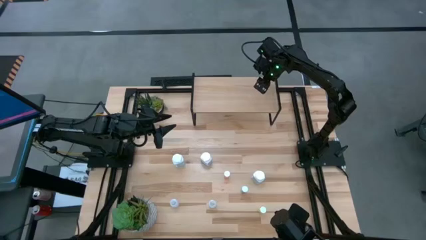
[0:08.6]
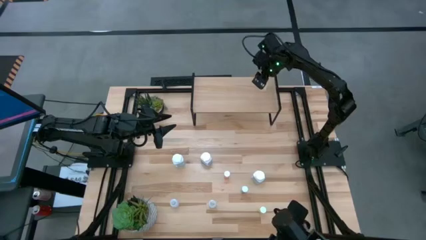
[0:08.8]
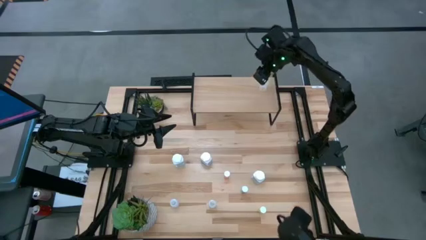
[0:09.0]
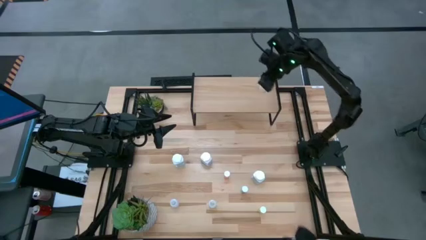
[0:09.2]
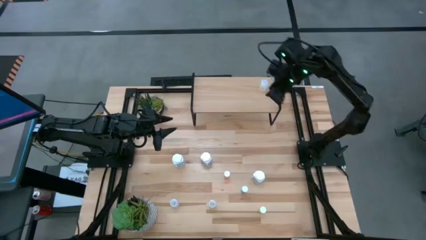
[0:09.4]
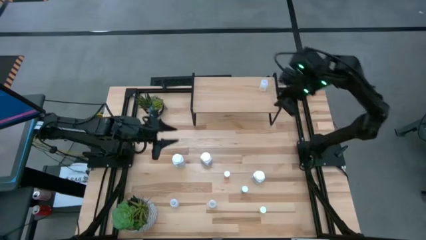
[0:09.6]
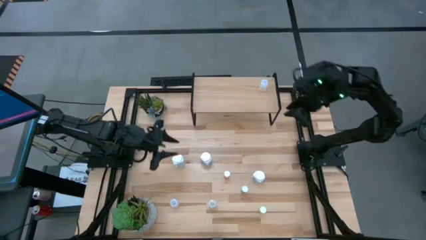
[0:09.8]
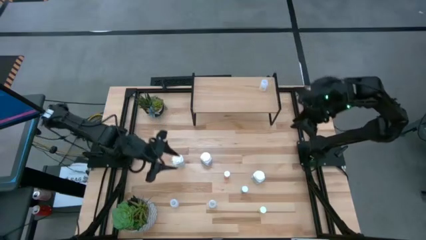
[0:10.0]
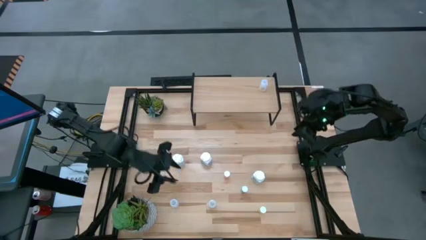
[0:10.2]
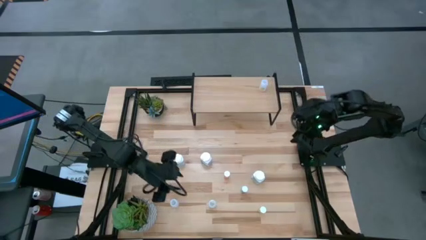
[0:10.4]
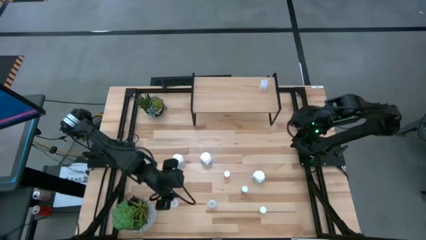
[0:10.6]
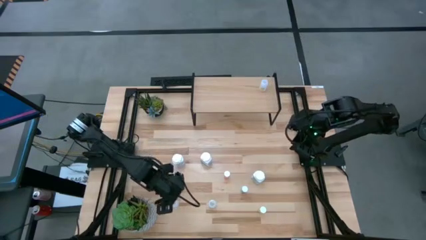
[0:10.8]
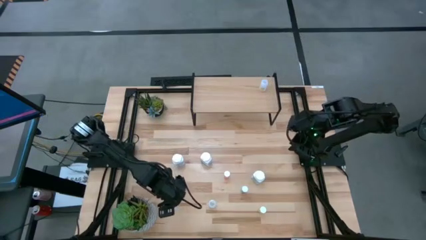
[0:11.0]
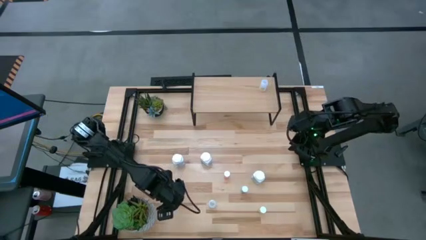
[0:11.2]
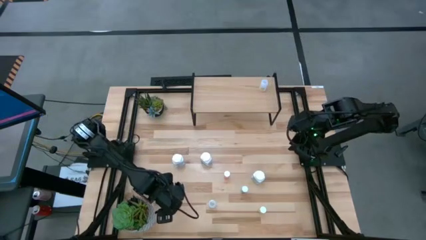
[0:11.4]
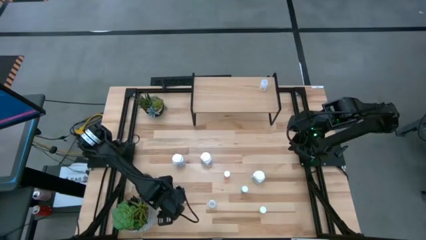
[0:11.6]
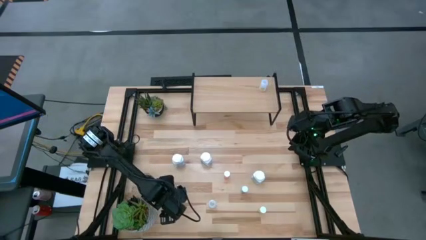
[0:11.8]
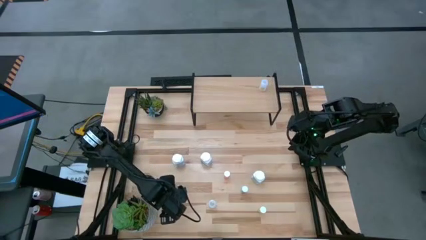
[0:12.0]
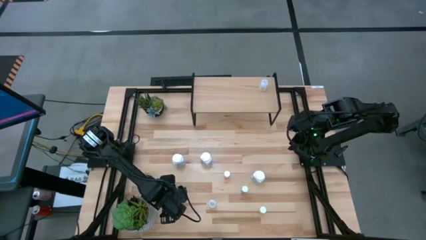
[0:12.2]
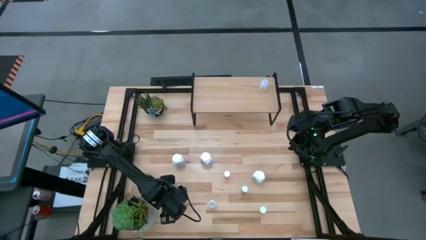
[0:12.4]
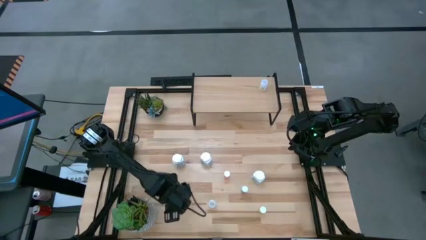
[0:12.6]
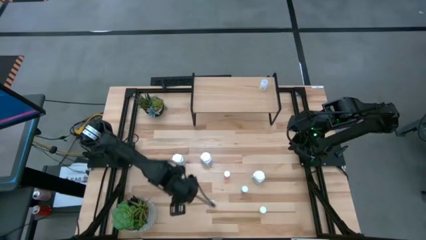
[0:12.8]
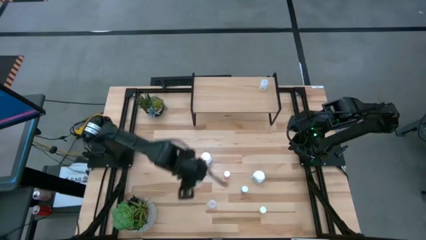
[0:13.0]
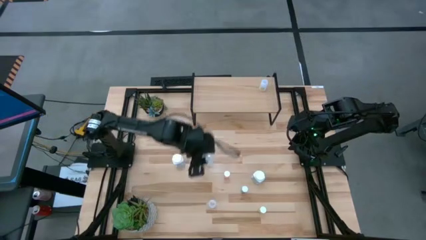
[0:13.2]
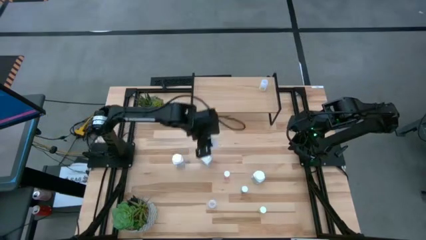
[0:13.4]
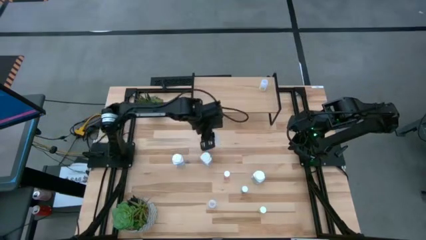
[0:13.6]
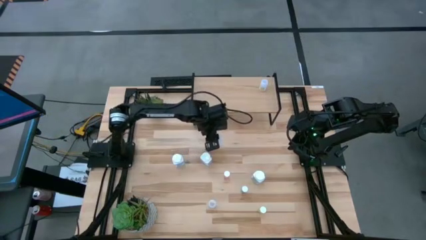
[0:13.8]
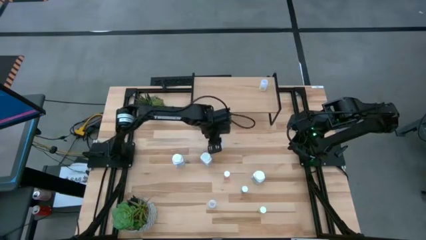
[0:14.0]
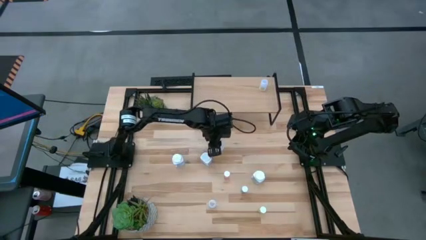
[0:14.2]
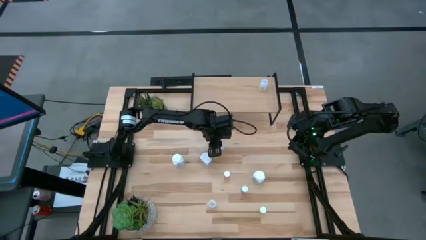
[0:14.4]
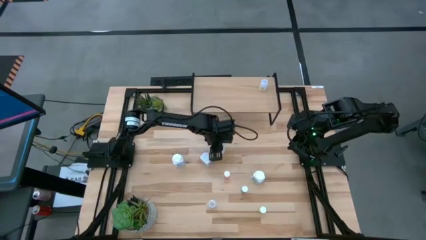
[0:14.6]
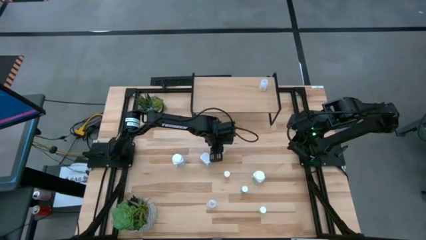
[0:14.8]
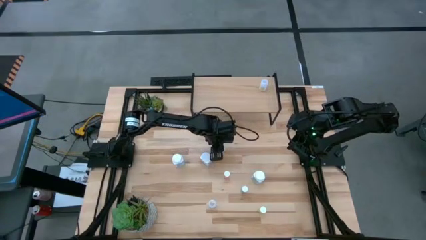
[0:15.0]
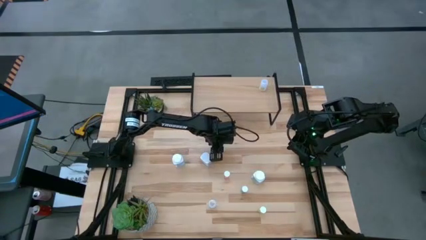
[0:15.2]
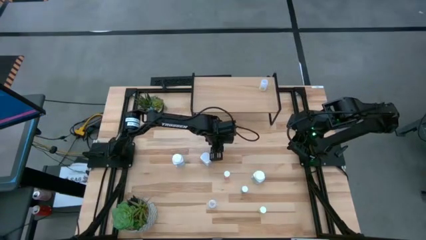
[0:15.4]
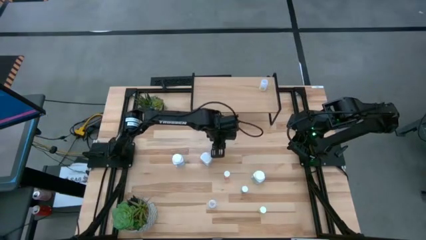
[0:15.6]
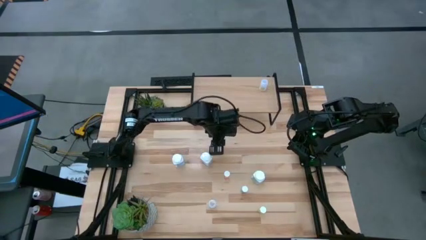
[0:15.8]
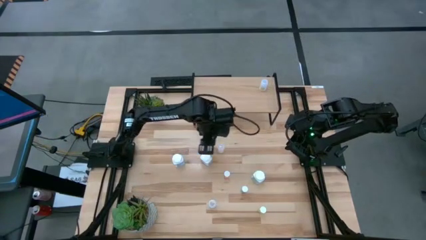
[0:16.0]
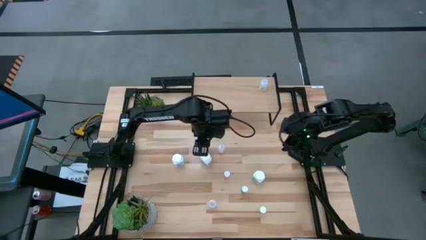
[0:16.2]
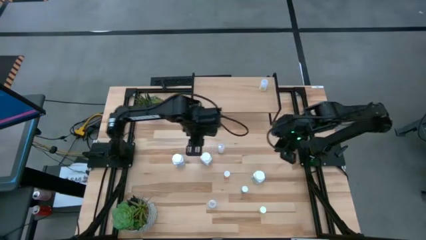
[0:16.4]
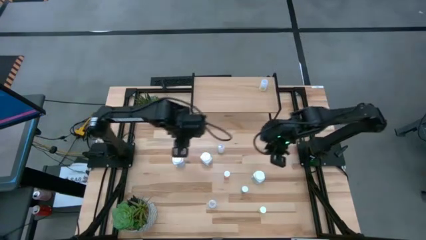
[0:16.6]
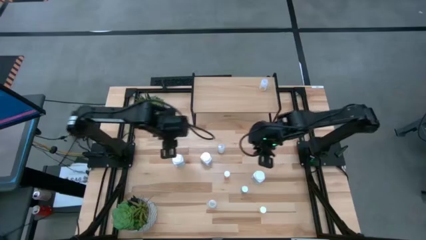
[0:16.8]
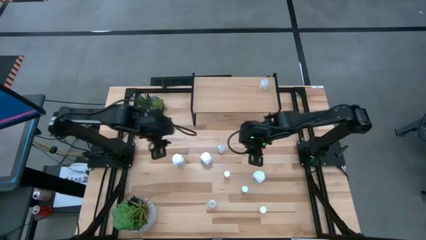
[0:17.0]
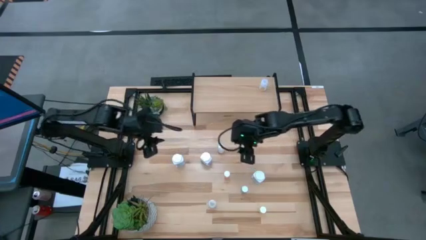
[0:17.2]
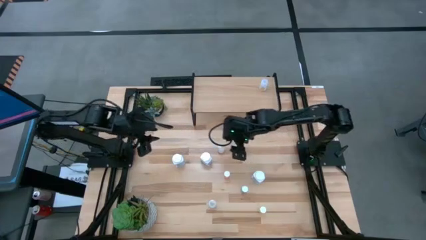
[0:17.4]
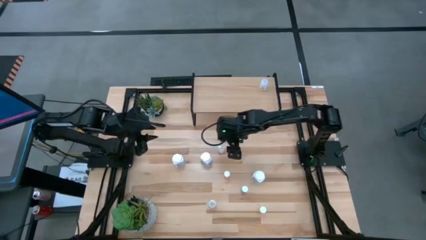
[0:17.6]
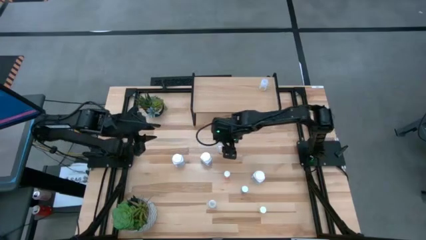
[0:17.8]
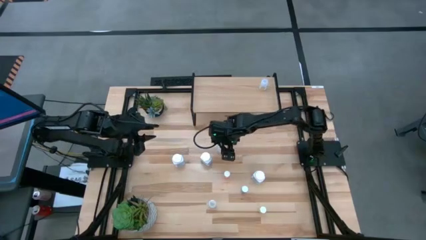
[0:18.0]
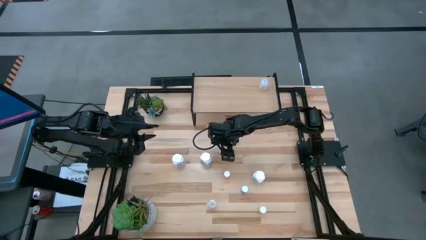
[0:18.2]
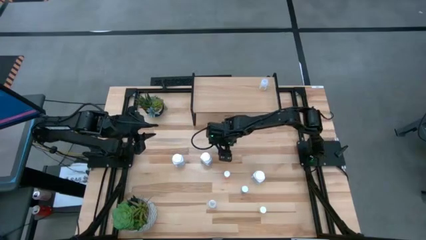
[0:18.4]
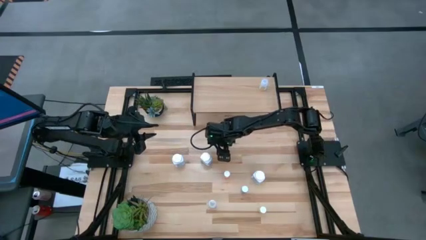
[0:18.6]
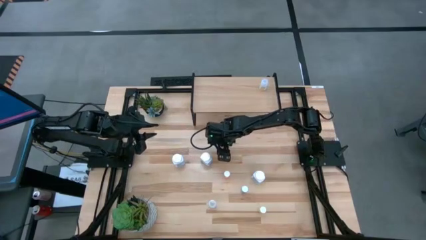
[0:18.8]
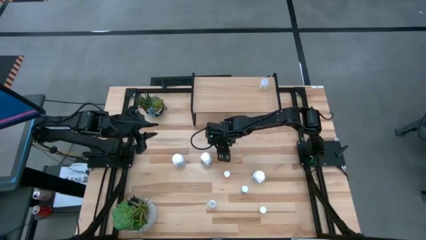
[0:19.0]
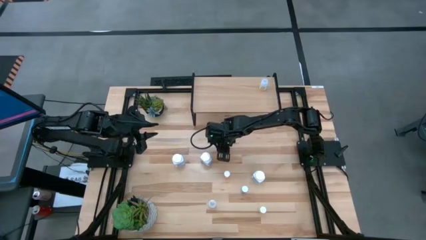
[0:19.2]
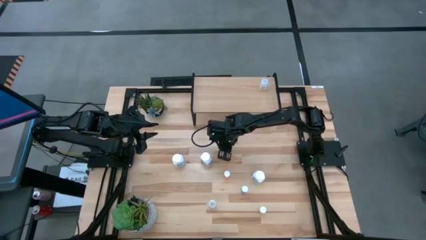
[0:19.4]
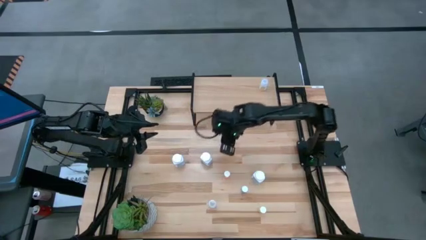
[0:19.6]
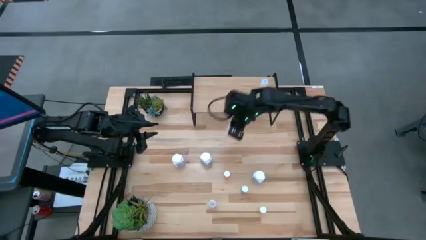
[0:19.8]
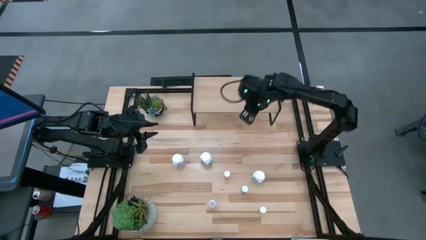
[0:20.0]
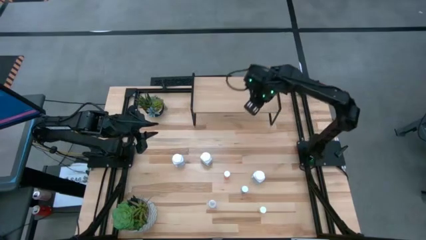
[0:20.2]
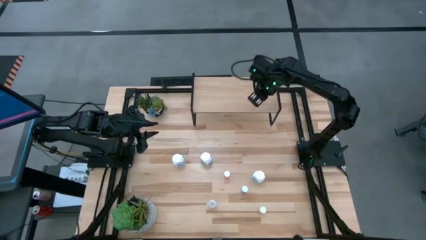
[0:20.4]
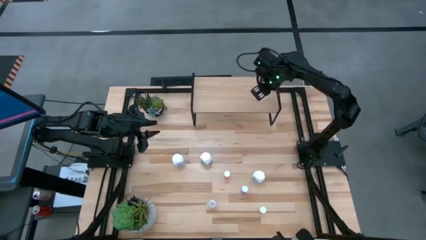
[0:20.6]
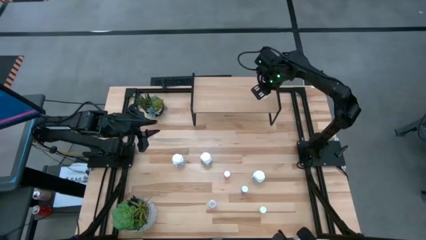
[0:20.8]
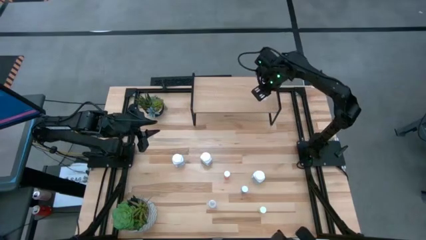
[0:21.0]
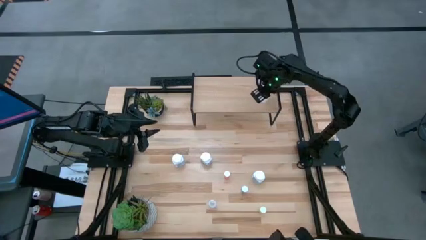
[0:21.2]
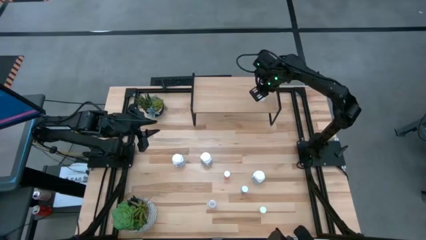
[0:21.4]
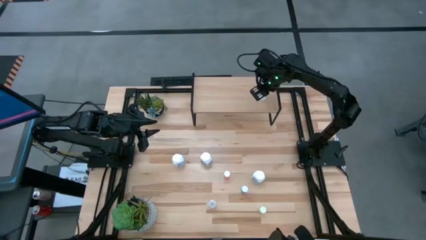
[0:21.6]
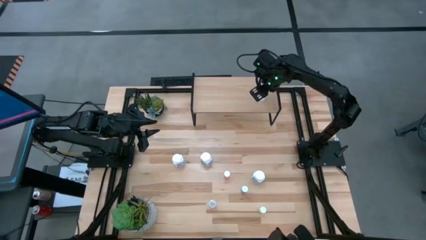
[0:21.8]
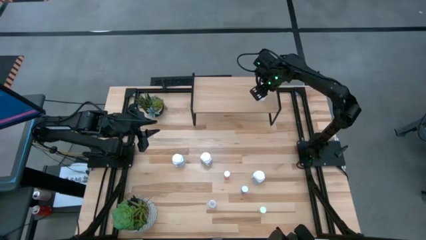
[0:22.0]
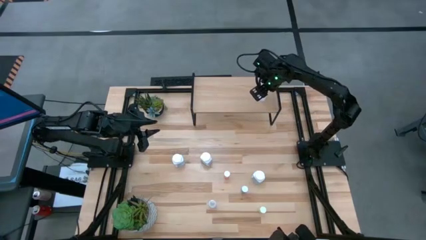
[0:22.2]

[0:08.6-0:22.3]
Task: Pick and place medicine bottles onto shelf by color
Put the left transparent pill bottle on the shelf aligned with the other transparent pill bottle
